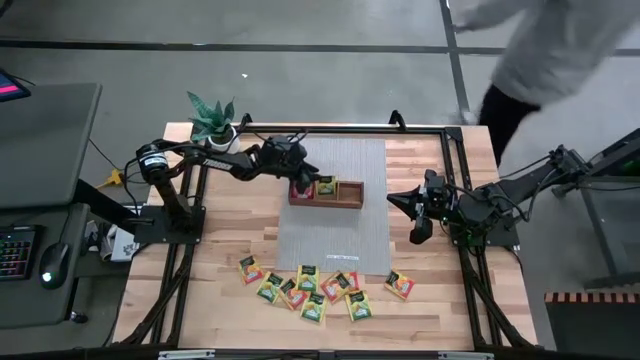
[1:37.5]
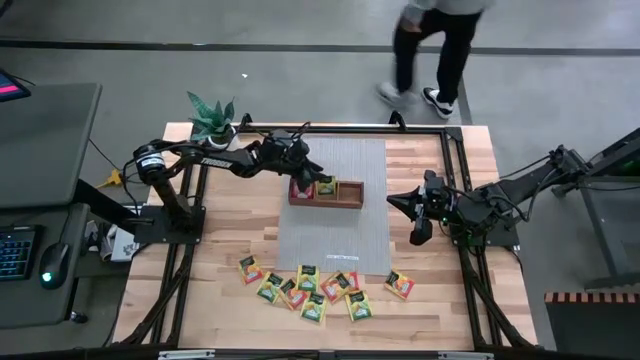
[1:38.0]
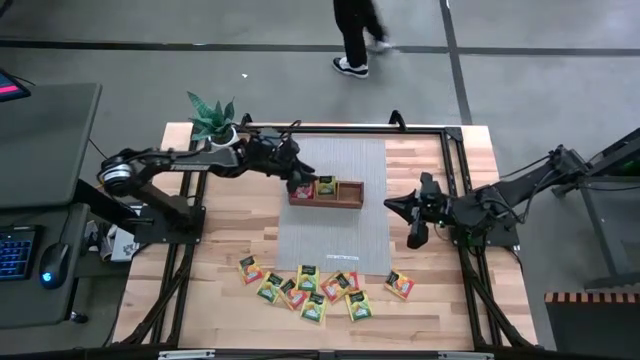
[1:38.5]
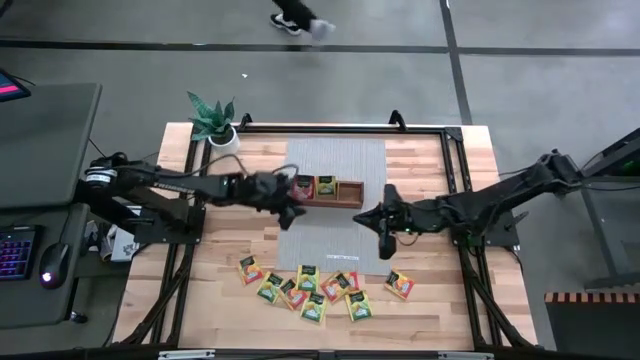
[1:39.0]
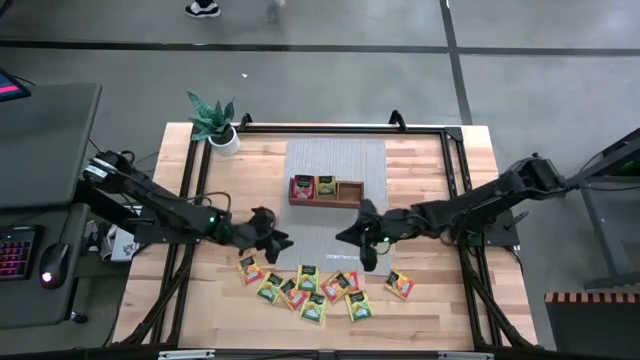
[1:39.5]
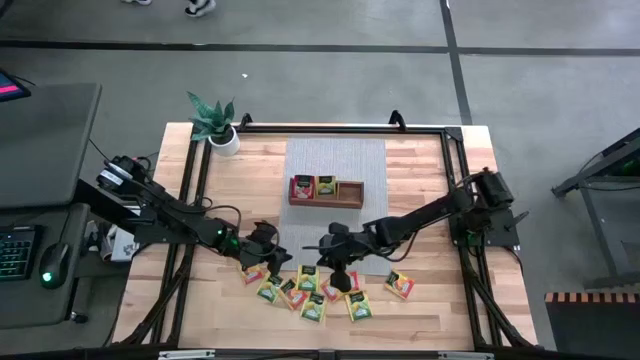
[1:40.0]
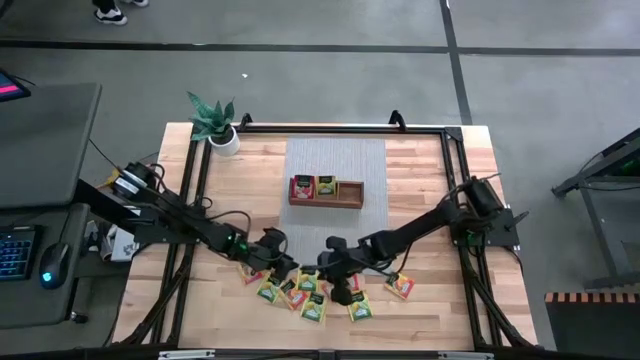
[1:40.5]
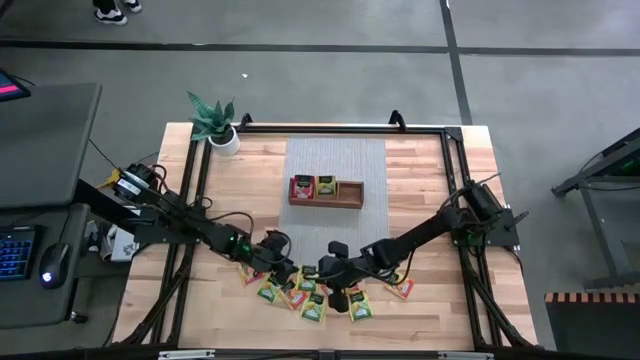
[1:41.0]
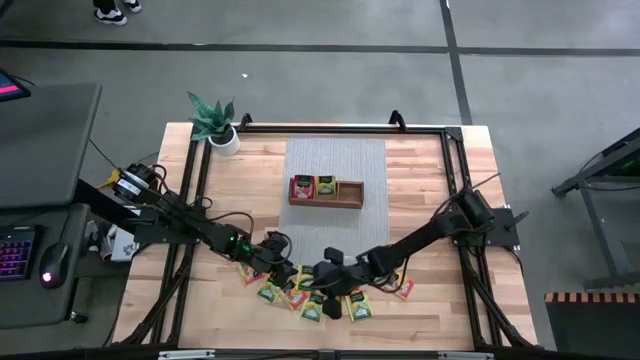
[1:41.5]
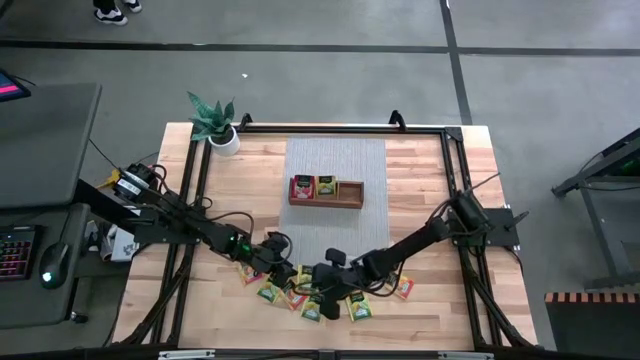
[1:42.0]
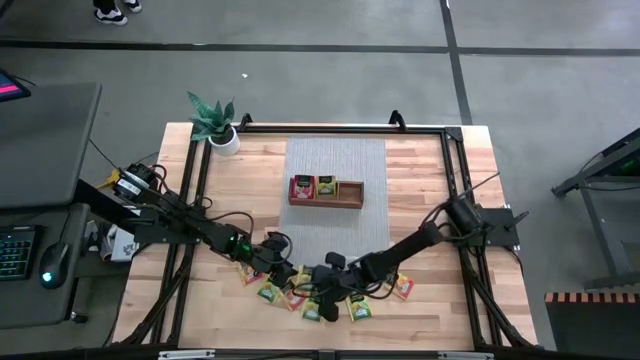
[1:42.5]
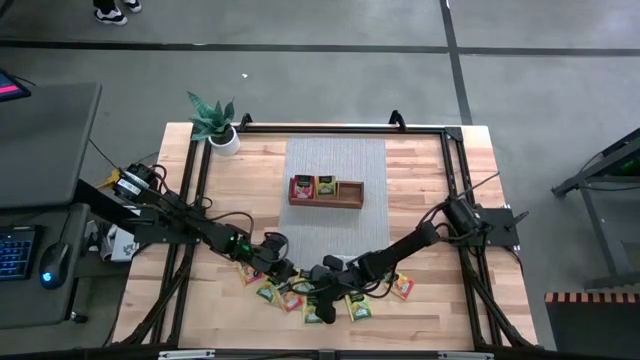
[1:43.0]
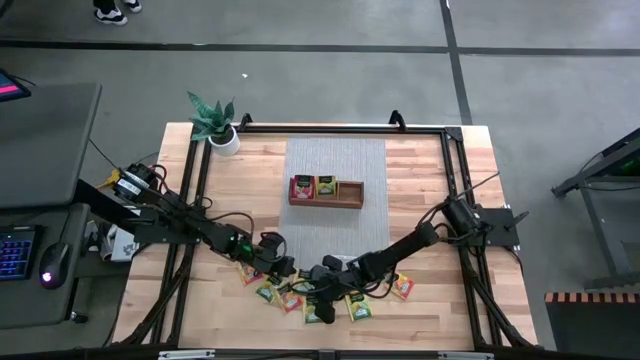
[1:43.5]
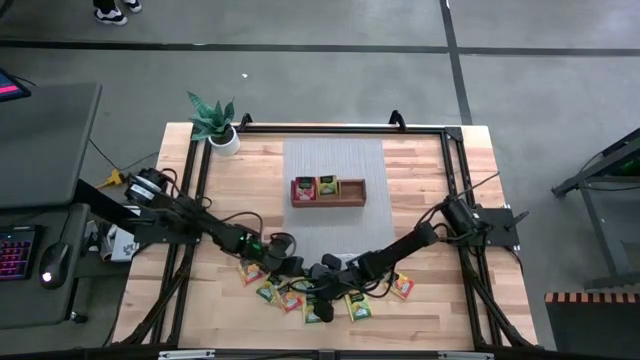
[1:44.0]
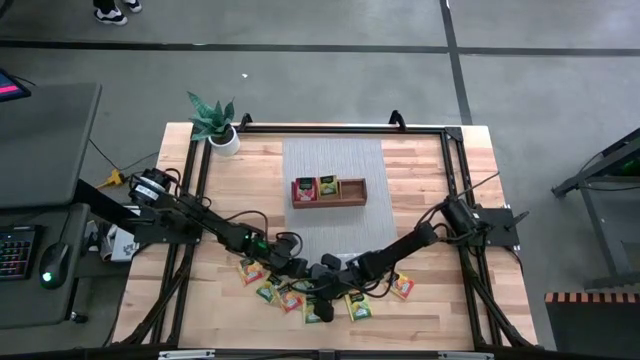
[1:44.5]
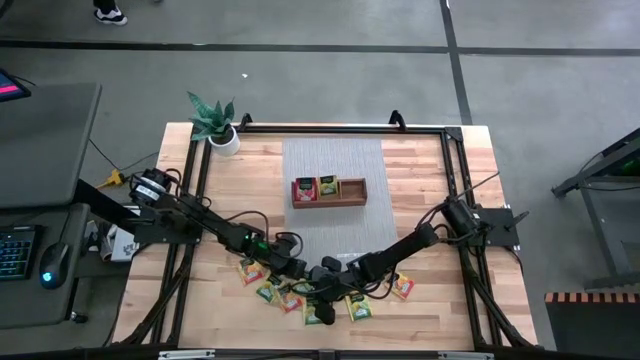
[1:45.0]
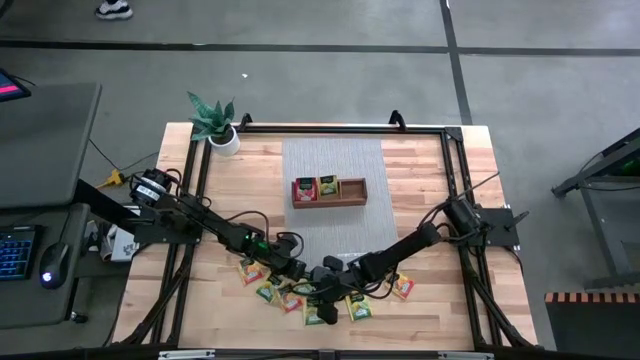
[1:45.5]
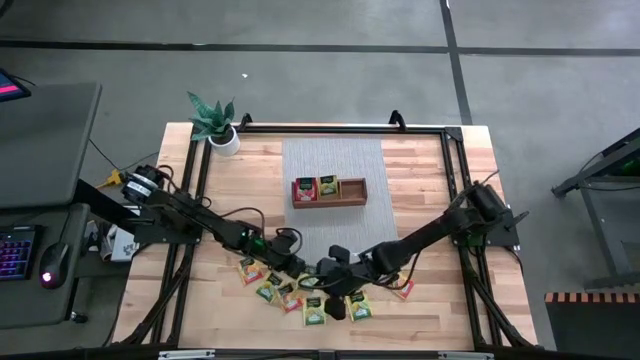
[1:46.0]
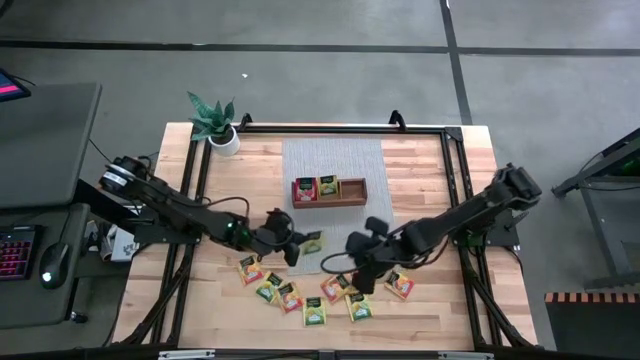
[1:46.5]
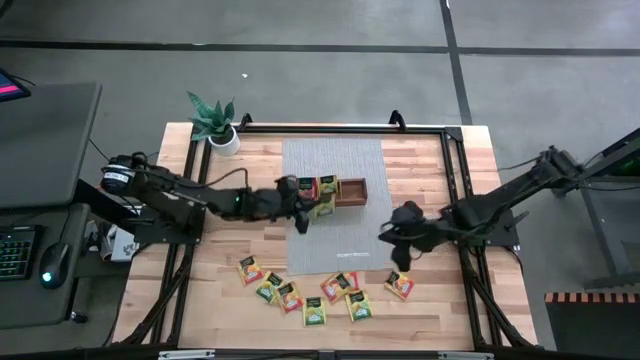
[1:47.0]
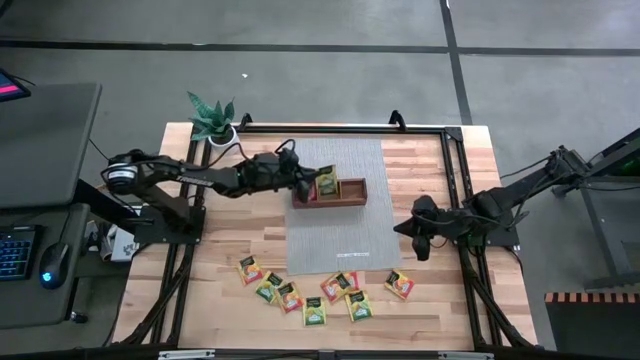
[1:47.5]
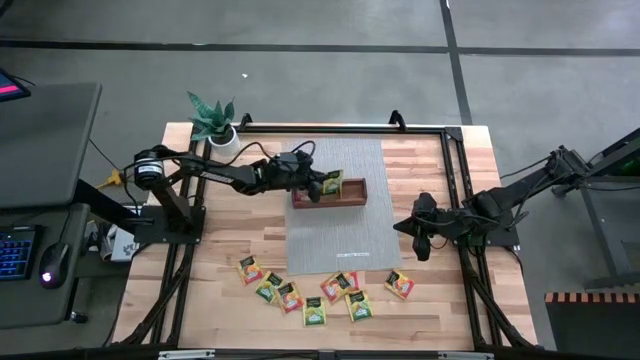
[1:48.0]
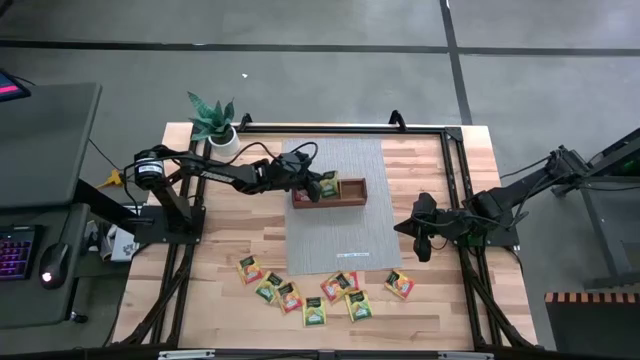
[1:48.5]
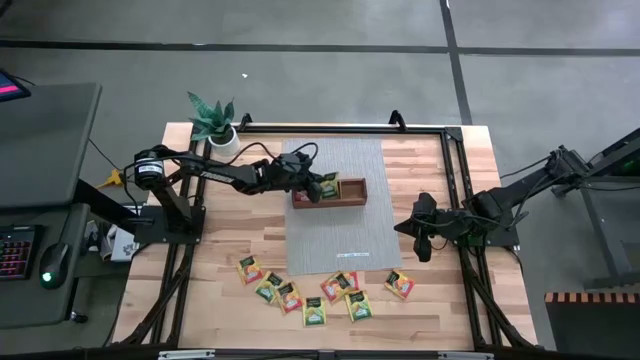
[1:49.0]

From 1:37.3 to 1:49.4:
Task: Pick & Place Tea
Put the yellow tea bag into the middle section of the wooden organizer

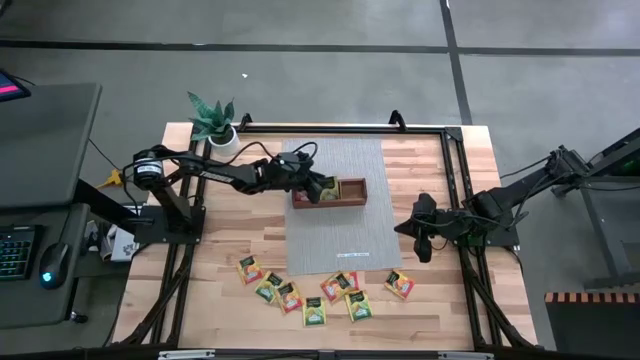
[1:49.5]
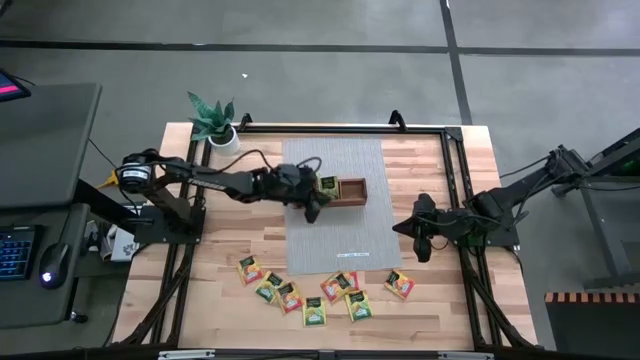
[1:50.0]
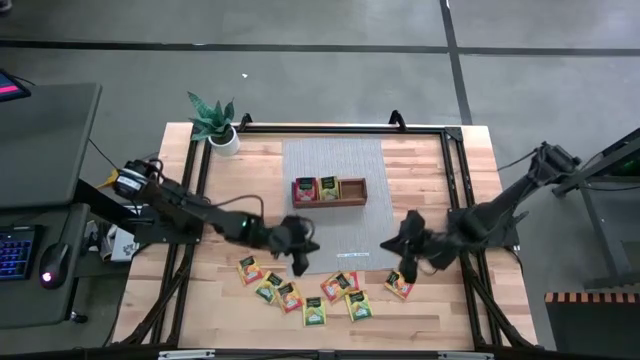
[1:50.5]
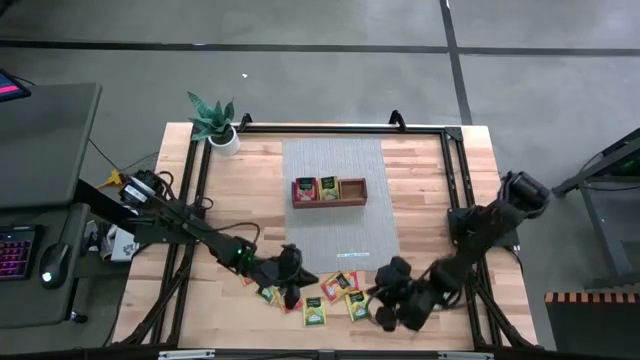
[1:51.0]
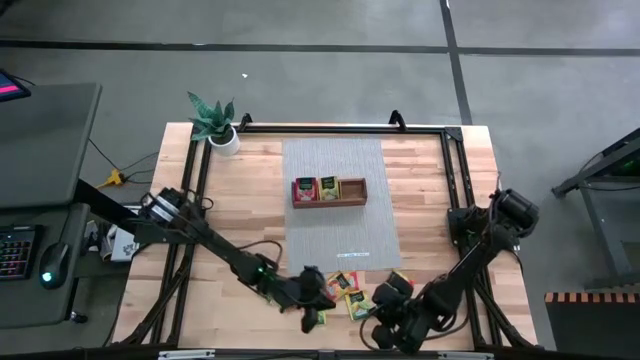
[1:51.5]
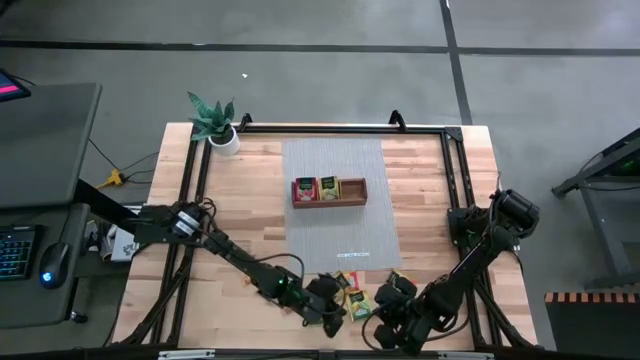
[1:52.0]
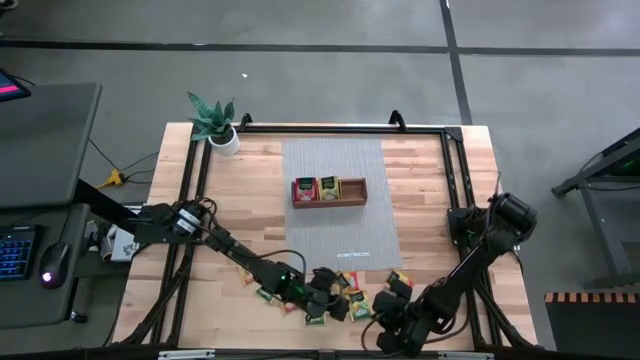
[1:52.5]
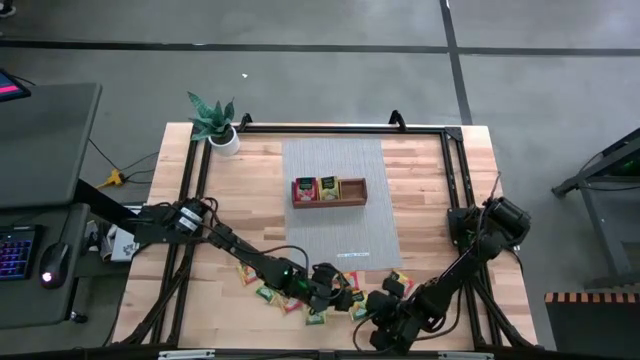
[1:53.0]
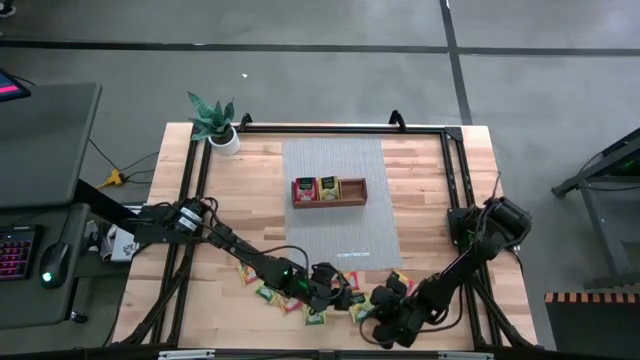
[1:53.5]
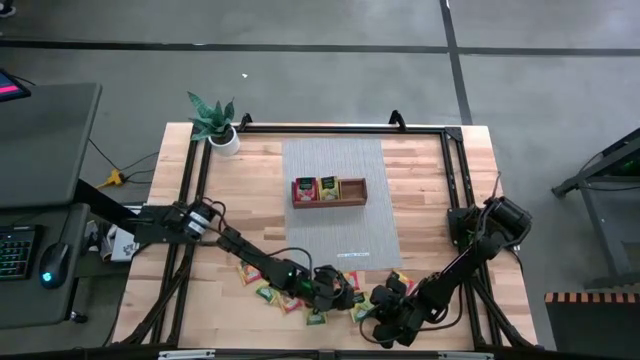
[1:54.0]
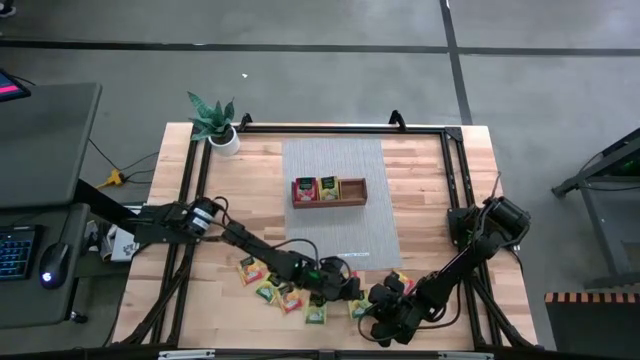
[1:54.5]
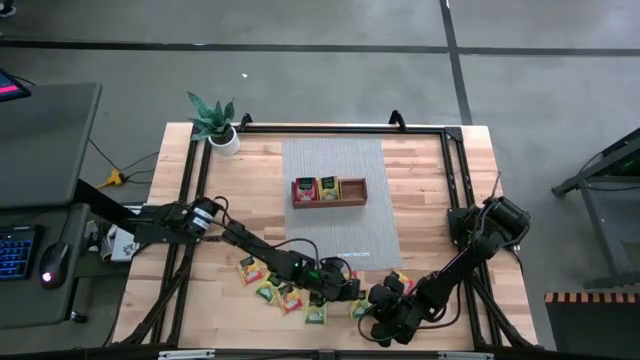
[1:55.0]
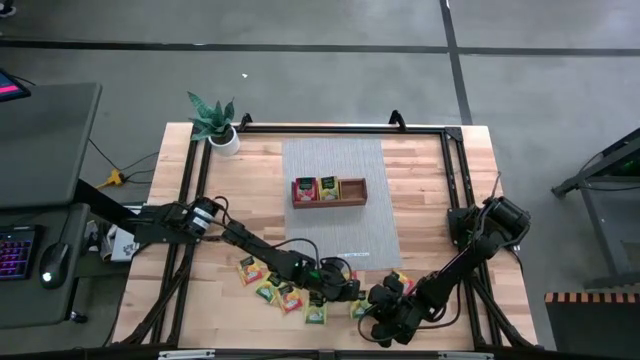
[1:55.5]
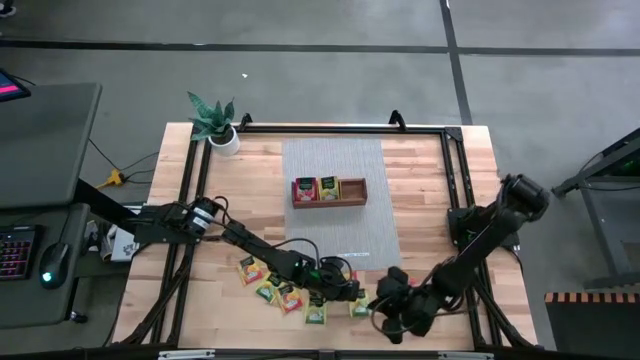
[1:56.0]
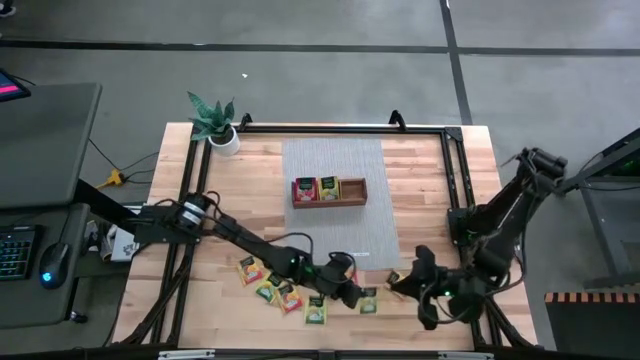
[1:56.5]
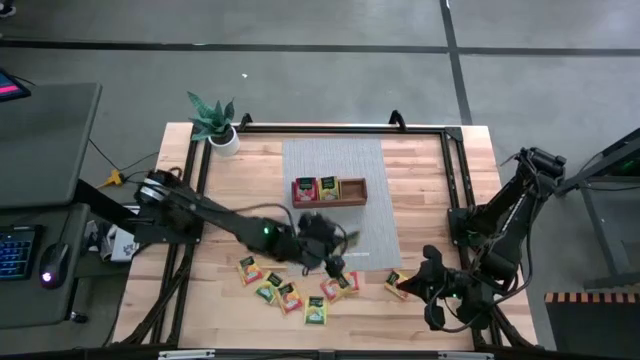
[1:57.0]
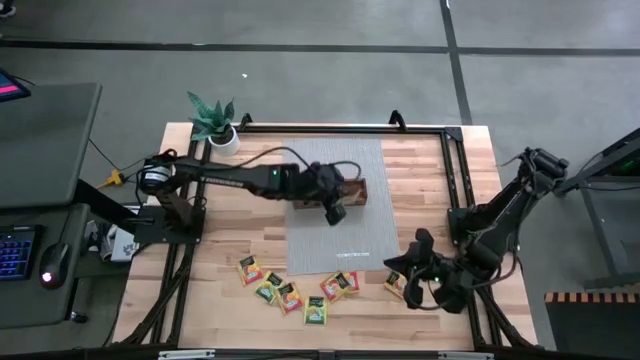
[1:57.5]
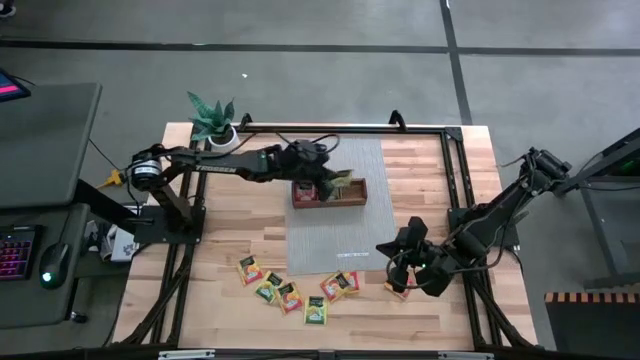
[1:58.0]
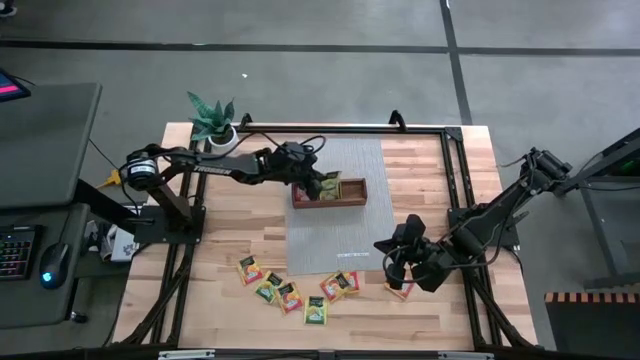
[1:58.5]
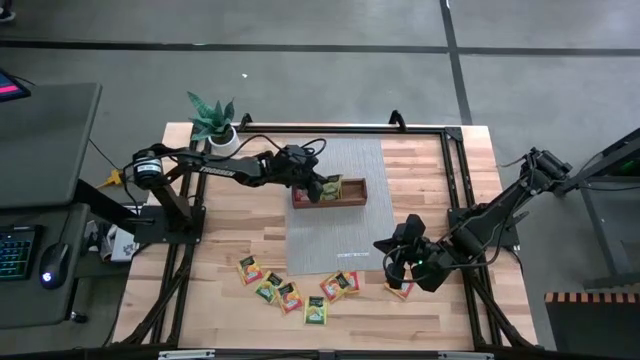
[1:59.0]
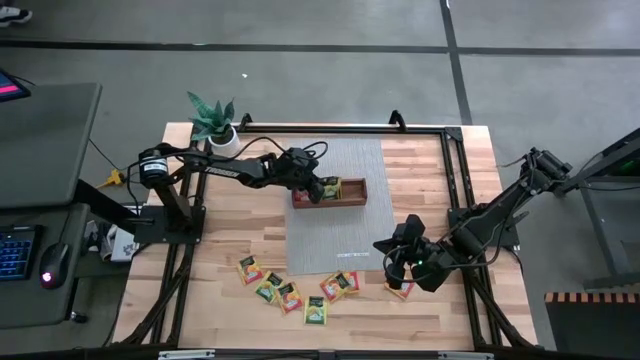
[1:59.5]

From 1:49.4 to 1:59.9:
Put the yellow tea bag into the middle section of the wooden organizer
